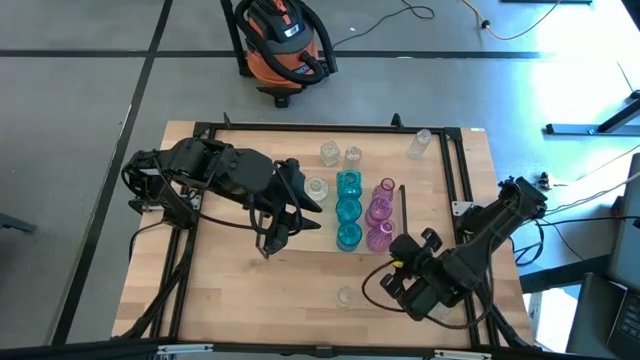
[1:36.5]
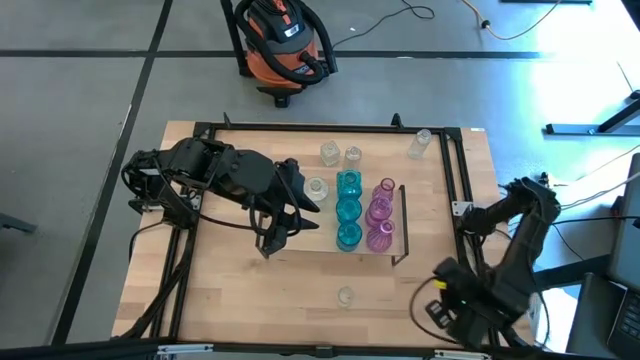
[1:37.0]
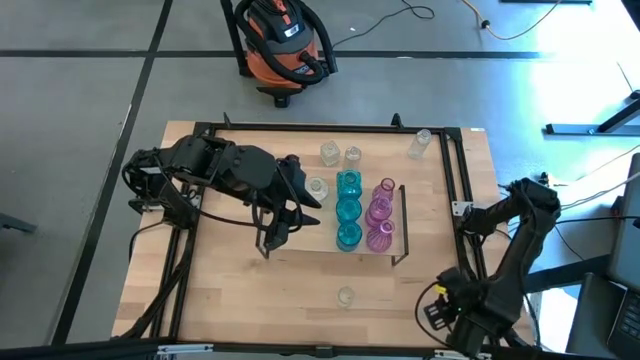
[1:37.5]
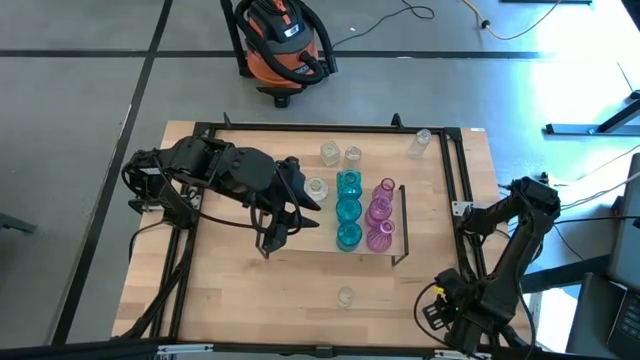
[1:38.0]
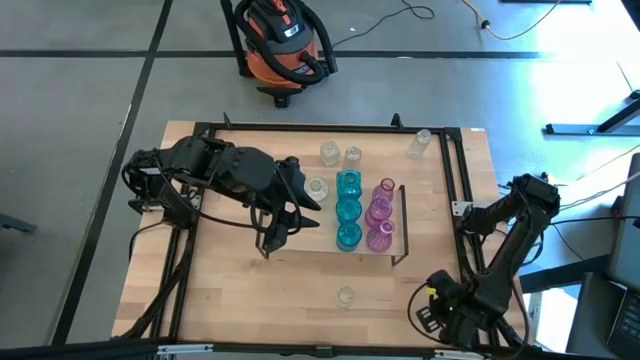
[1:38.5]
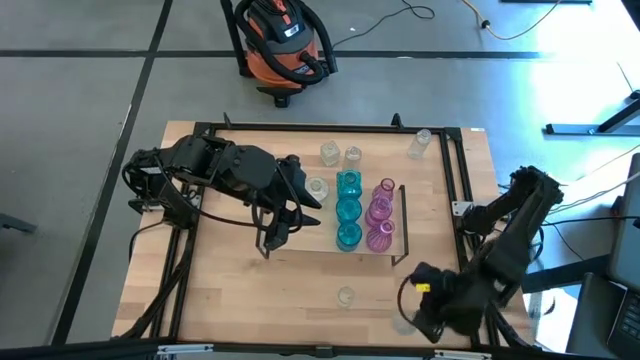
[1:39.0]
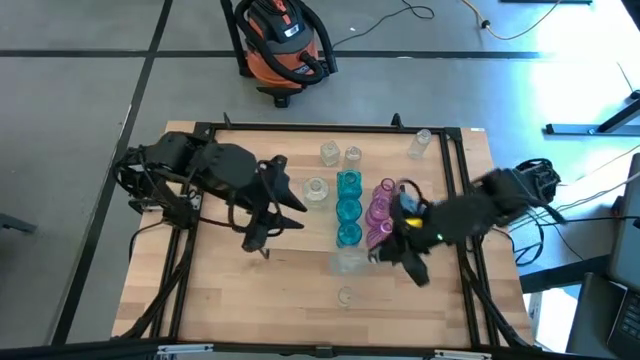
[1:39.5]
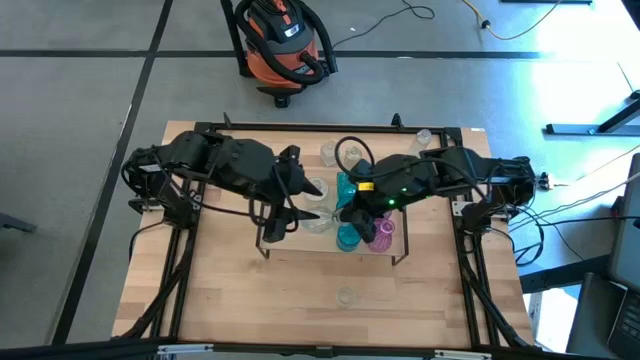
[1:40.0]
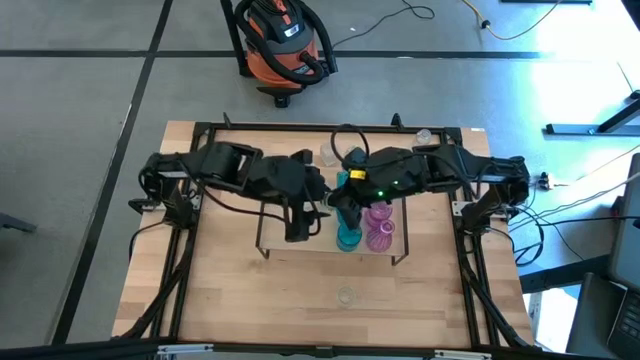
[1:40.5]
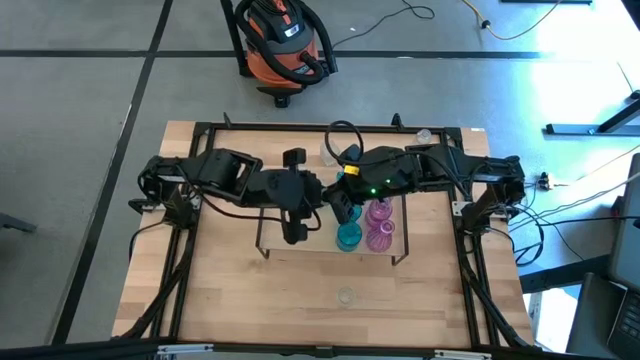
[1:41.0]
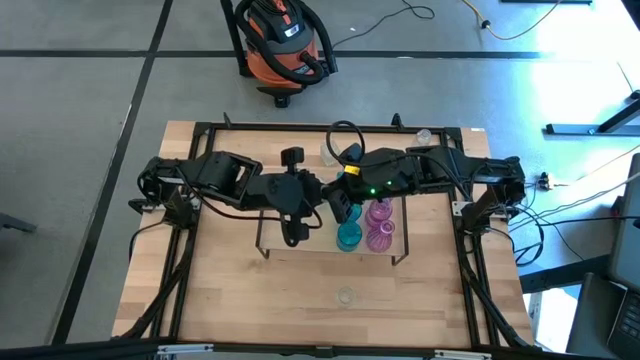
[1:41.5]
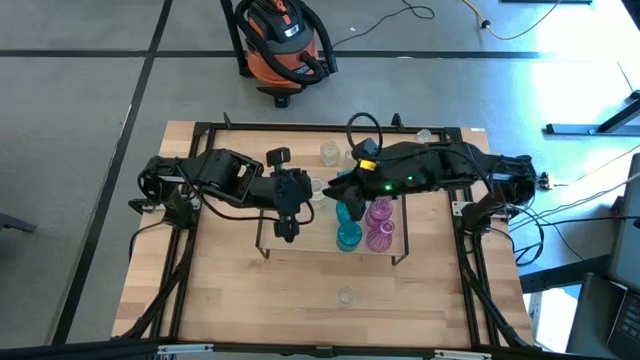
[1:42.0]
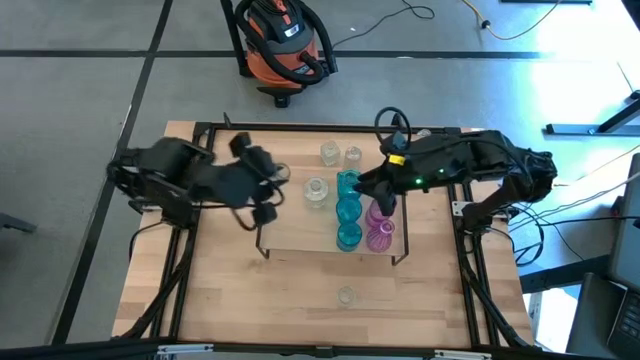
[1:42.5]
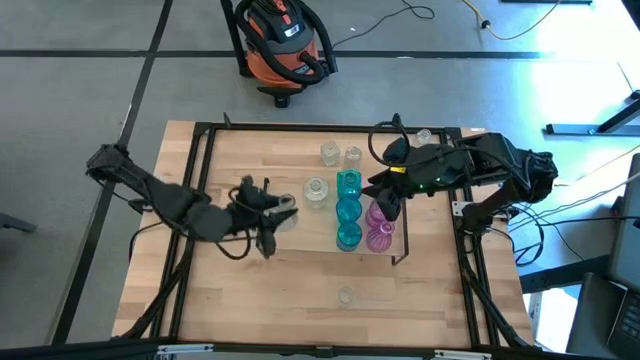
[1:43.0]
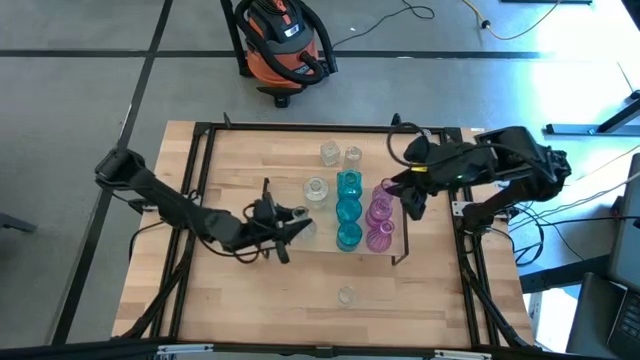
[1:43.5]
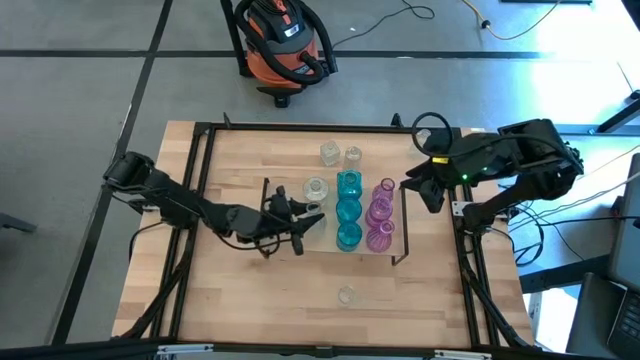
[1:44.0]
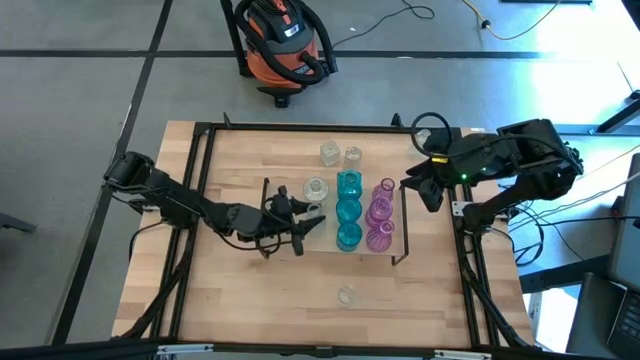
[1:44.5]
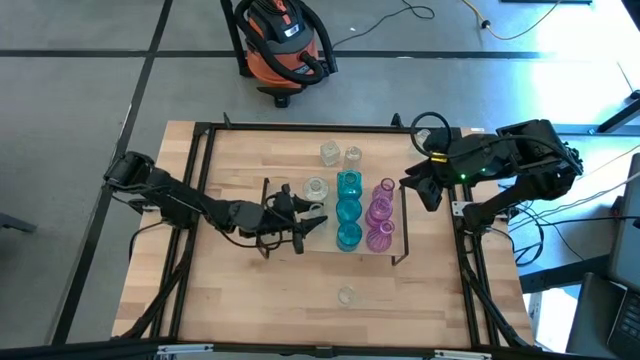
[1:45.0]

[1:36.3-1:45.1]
Task: sort vases onto shelf
Put the bottom right transparent vase on the shelf

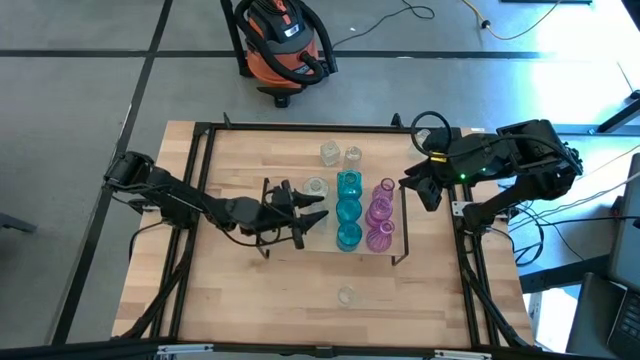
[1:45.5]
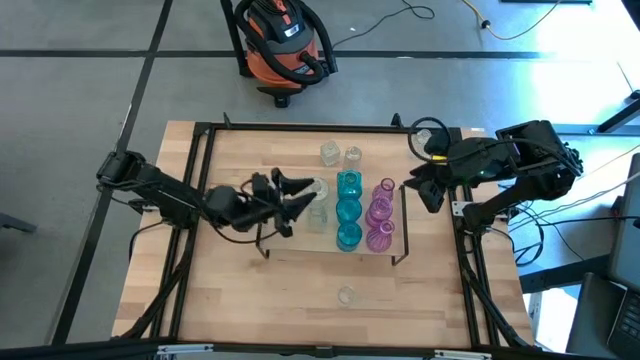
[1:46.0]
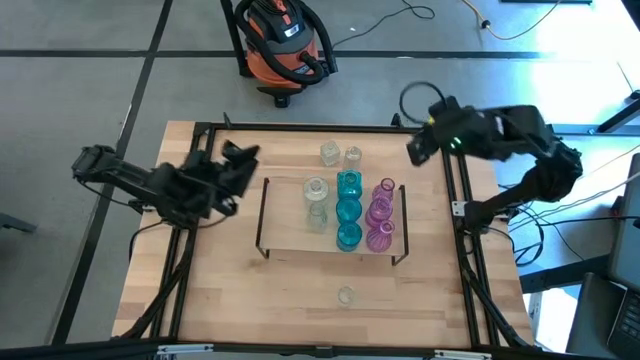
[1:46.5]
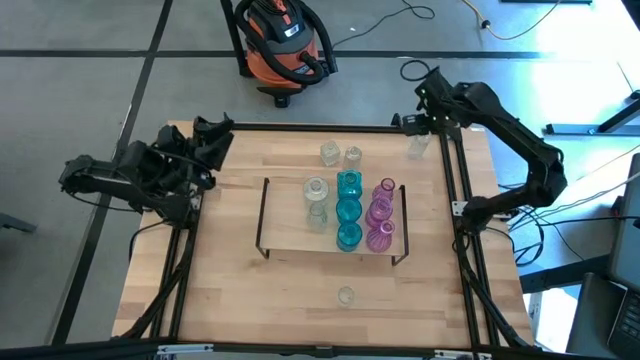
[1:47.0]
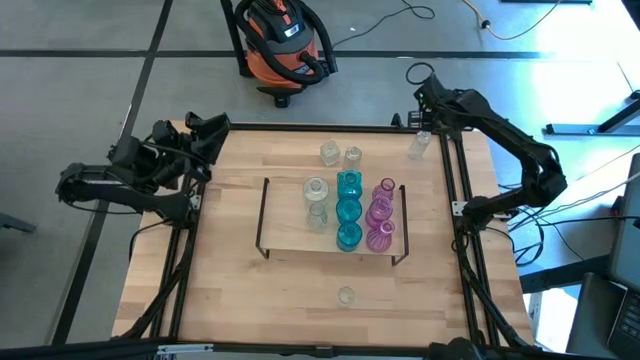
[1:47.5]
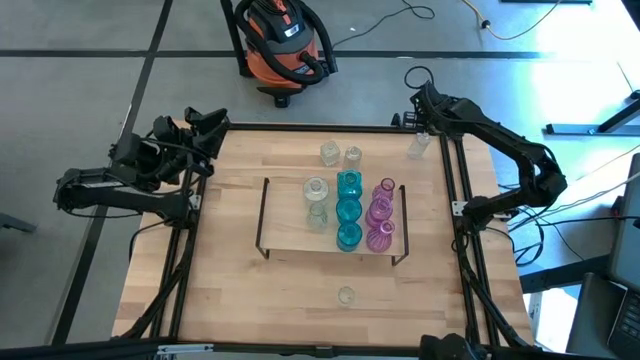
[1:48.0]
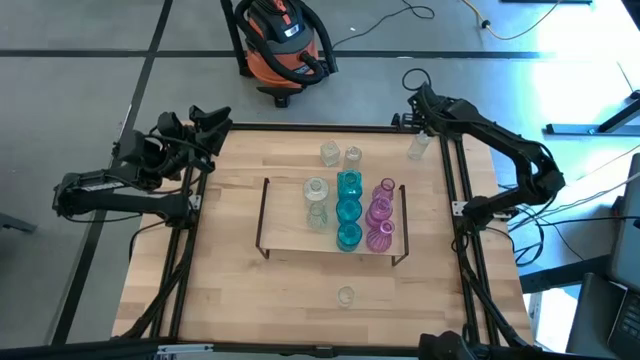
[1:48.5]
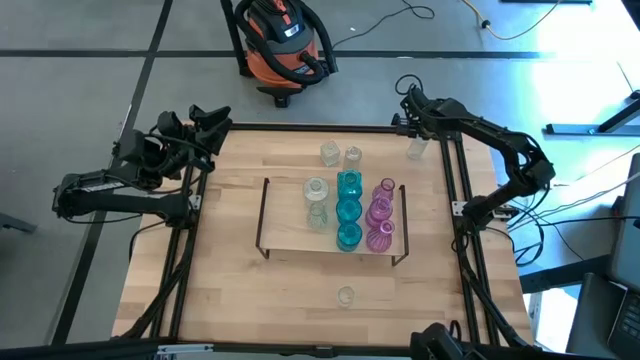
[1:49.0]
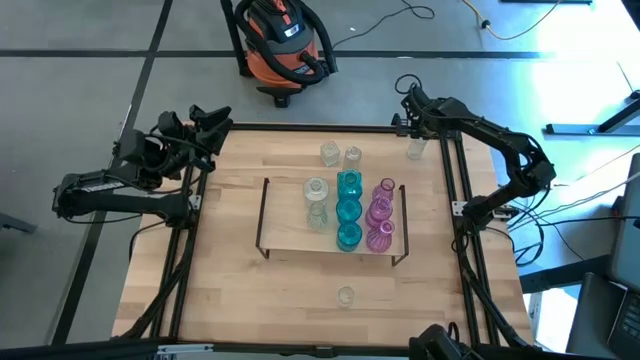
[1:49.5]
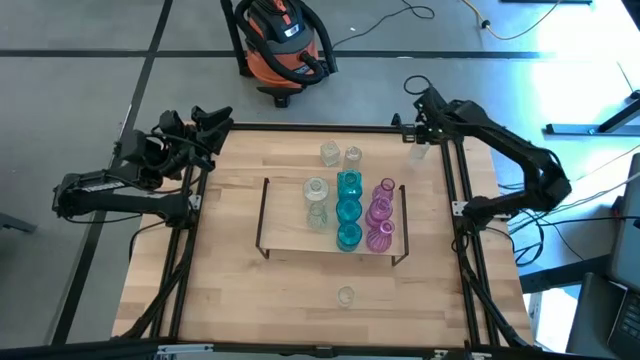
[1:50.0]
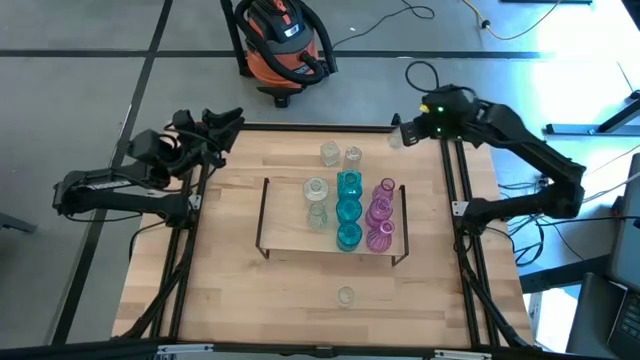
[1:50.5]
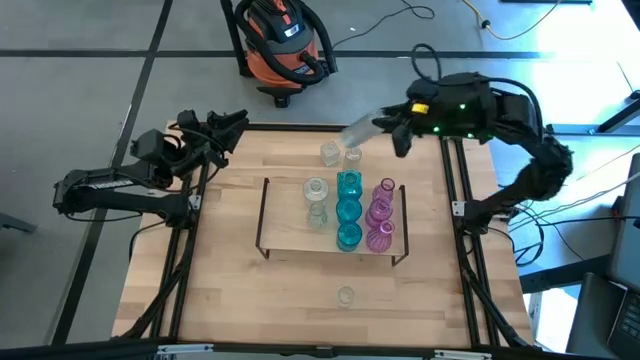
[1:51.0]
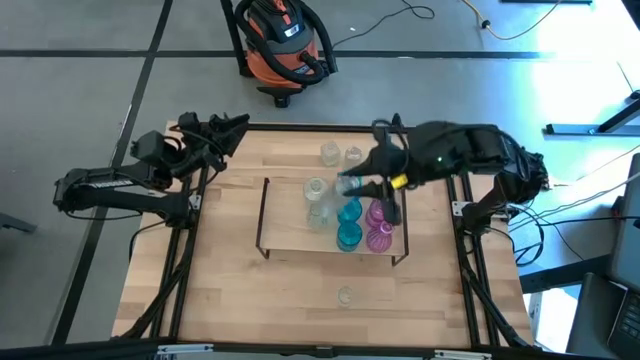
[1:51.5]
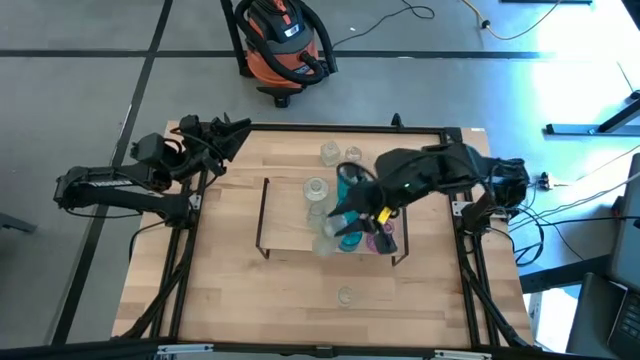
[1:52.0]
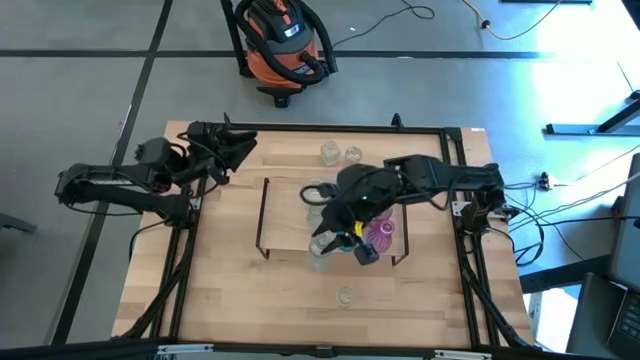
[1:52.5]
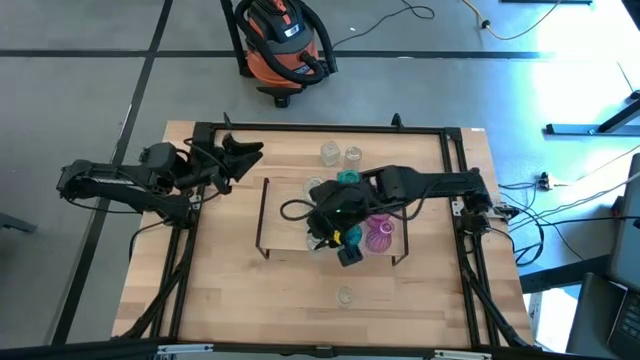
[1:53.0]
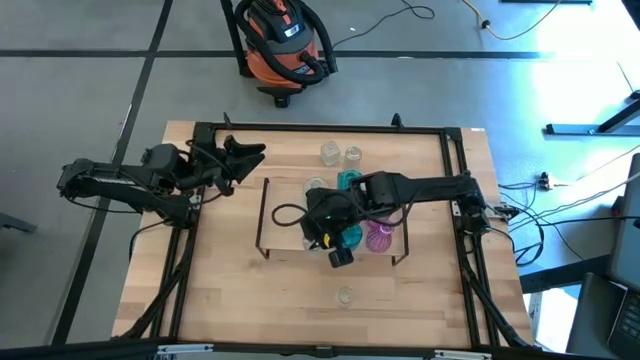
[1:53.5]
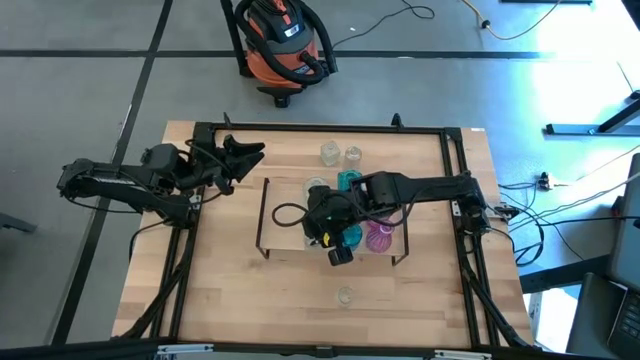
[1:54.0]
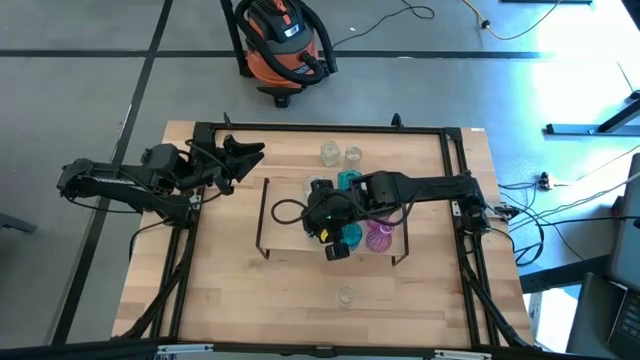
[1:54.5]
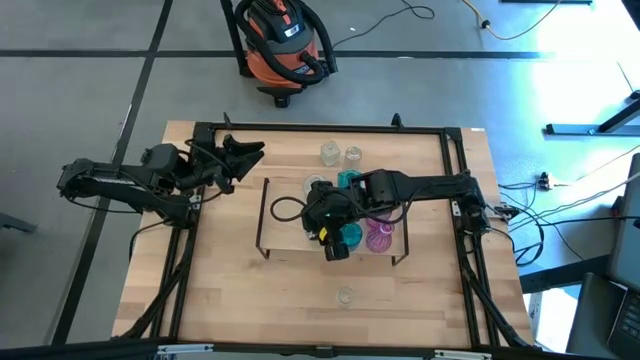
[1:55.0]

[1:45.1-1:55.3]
Put the top right transparent vase on the shelf

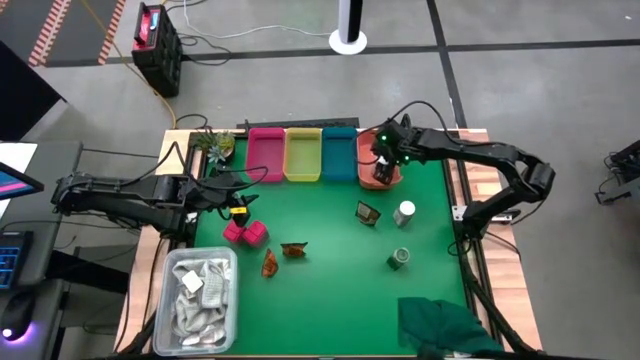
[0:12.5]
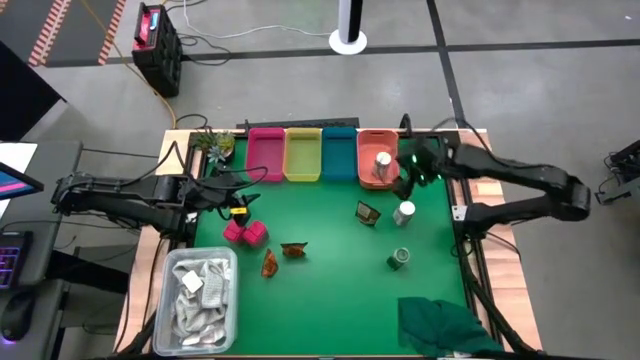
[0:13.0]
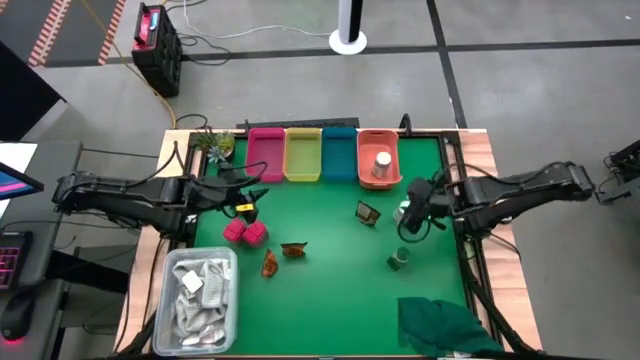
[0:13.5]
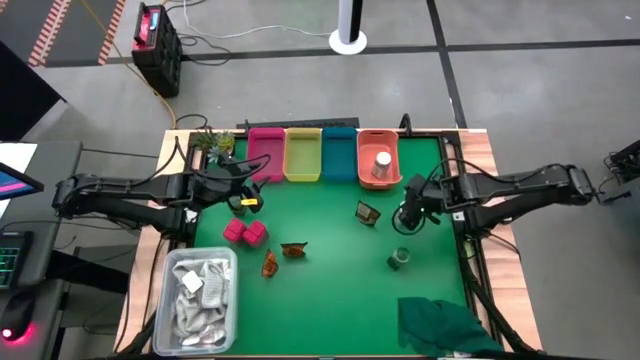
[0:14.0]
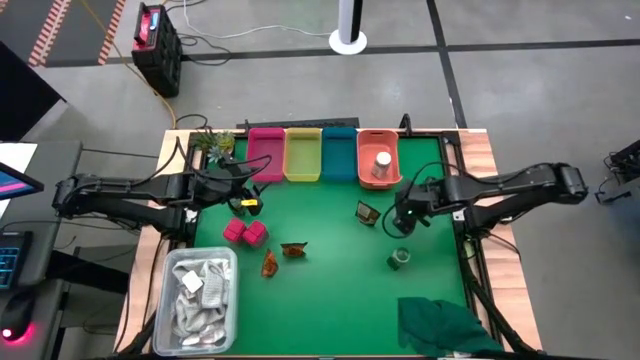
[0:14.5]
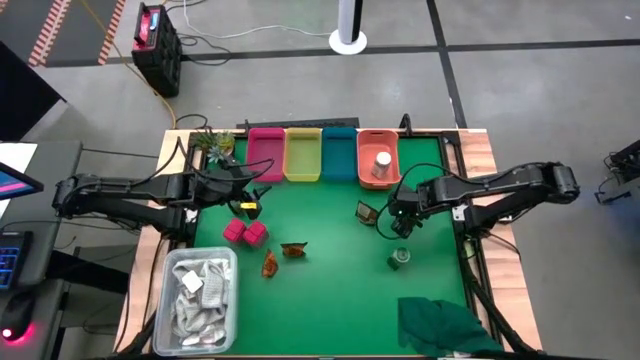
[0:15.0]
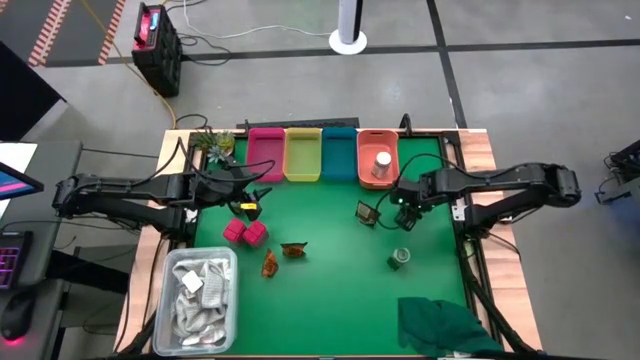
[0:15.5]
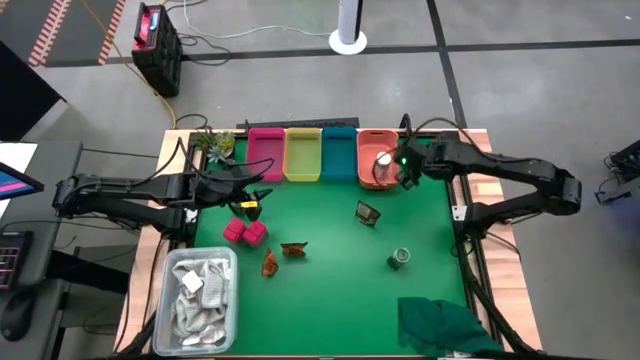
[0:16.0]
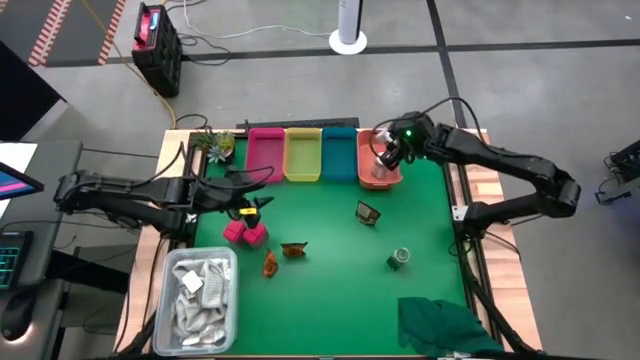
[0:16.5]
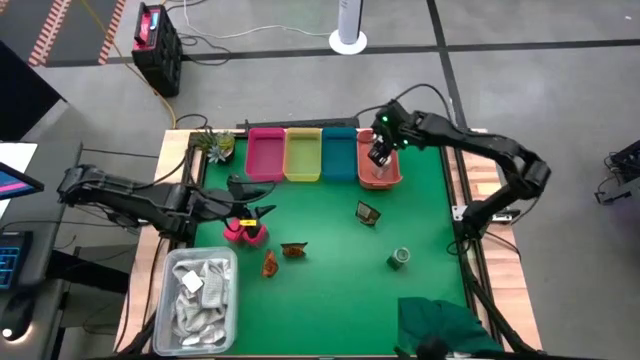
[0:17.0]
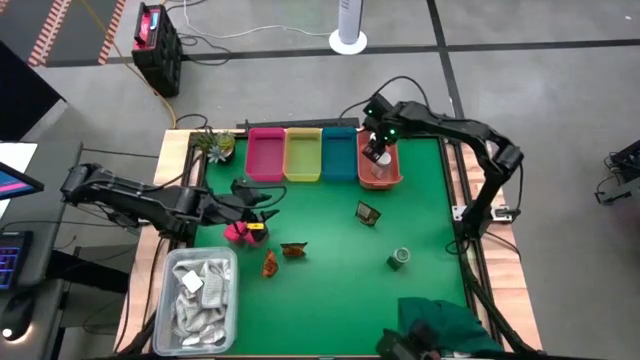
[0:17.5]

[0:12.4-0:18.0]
Task: Sort spices by type
Put the white lid seasoning bottle into the orange bin
